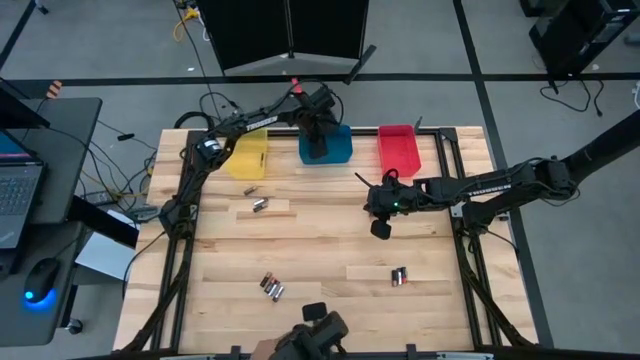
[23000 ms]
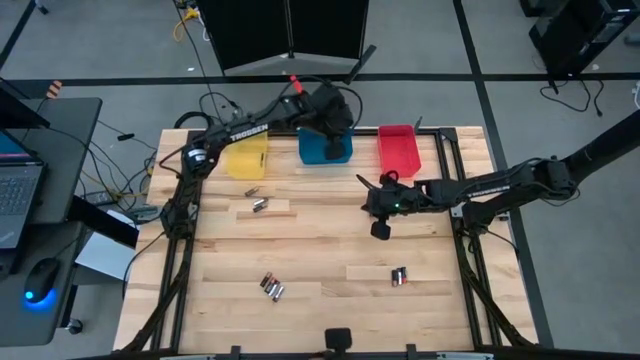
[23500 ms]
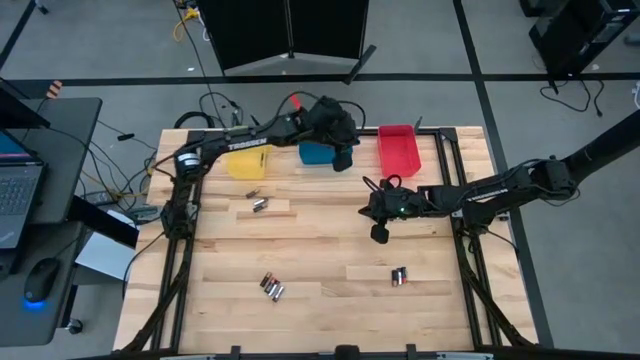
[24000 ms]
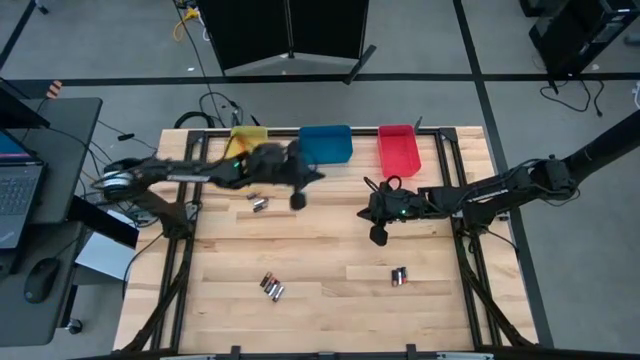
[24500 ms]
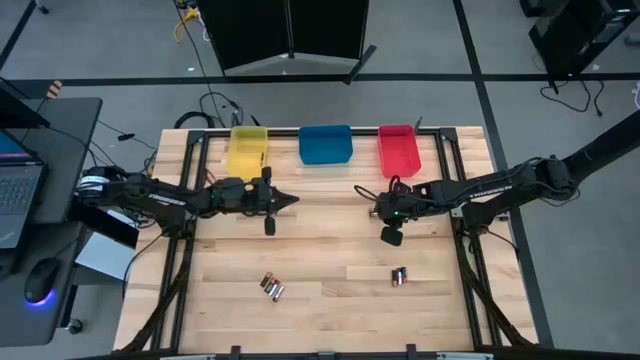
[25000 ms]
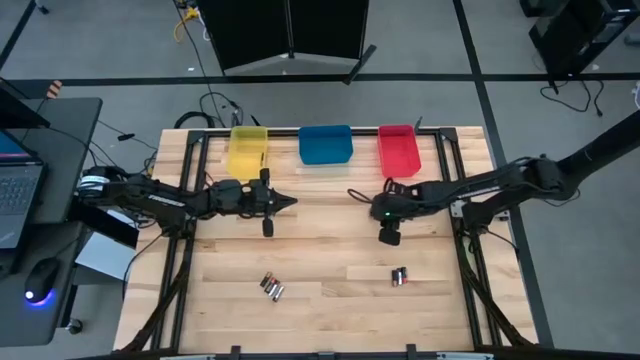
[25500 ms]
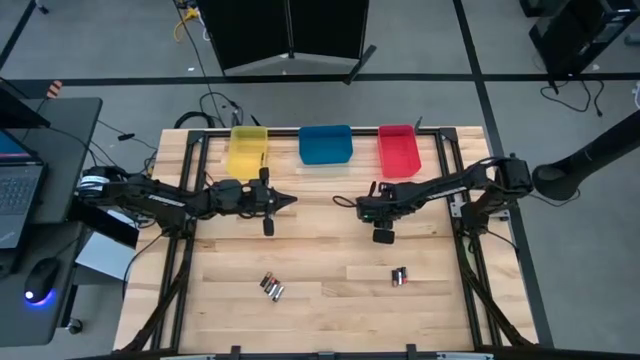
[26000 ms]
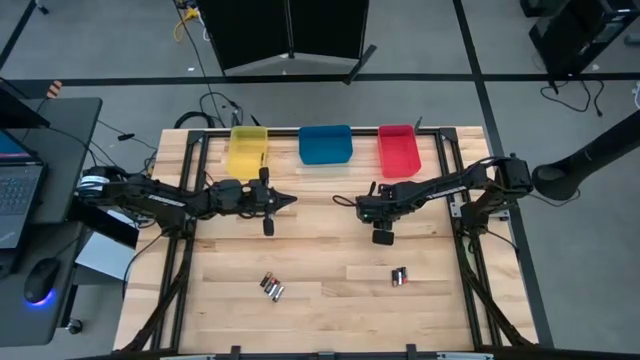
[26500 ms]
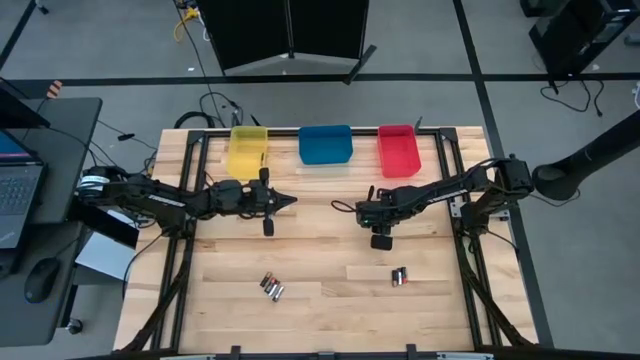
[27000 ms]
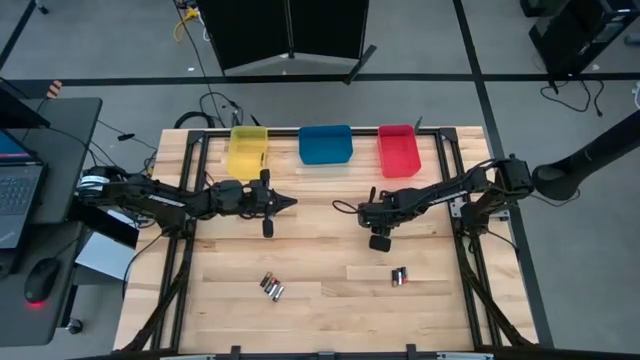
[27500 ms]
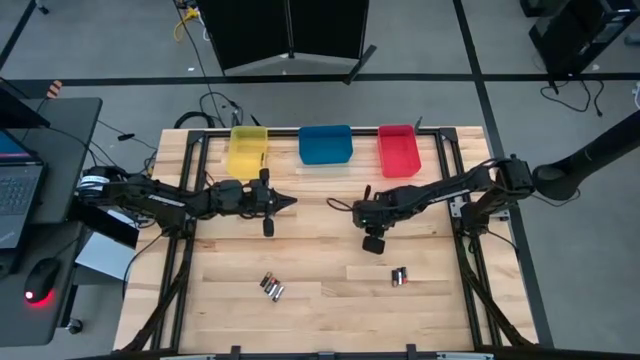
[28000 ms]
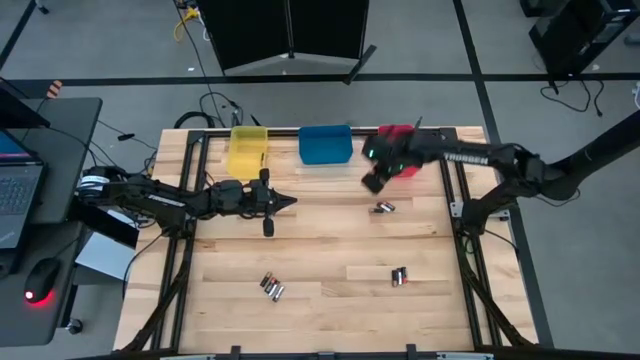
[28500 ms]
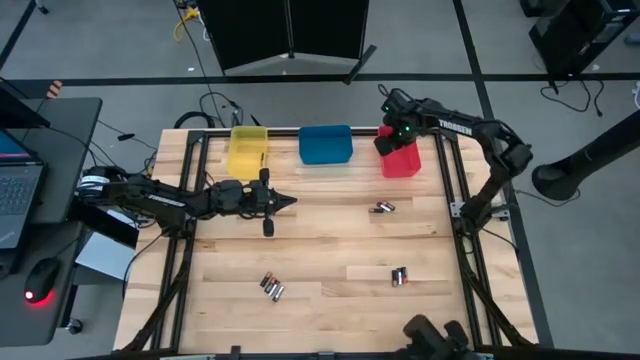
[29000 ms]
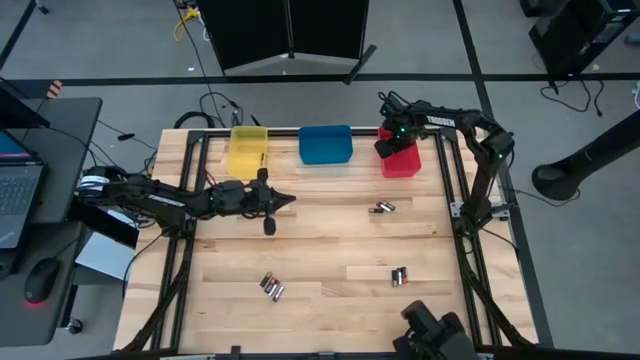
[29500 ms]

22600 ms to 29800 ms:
Task: Sort batteries
Put the silver battery into the pink bin

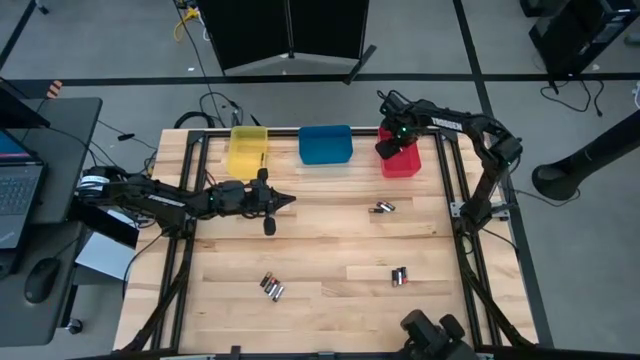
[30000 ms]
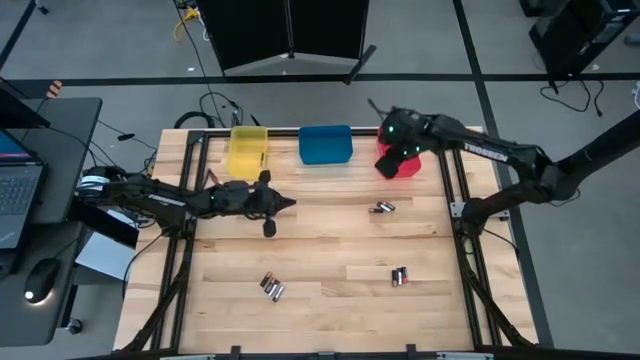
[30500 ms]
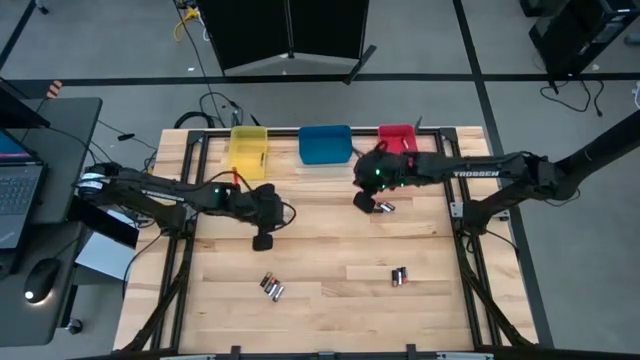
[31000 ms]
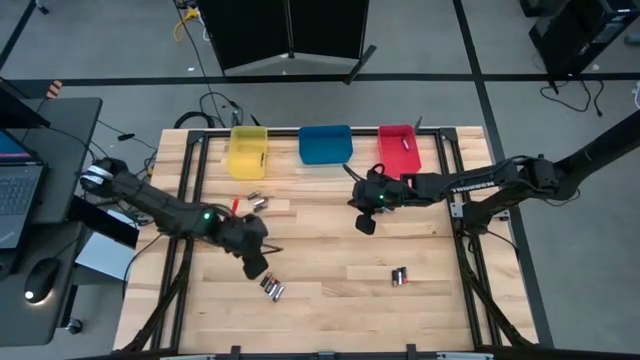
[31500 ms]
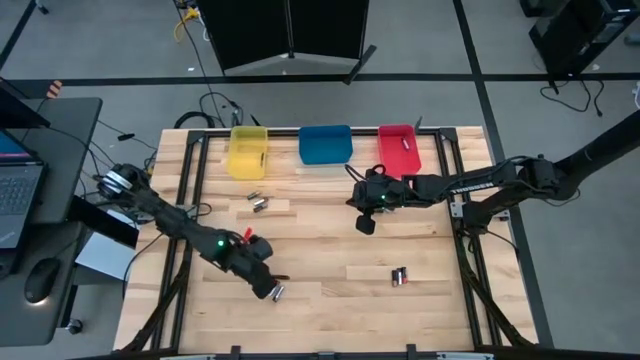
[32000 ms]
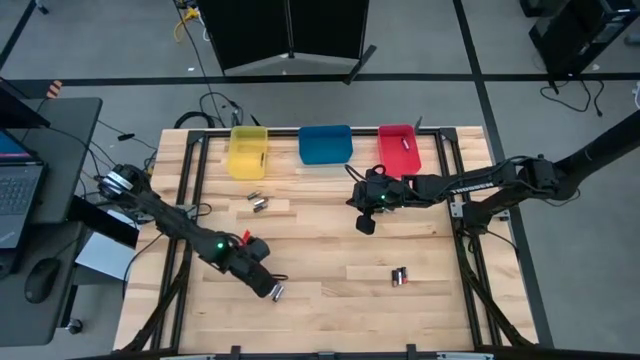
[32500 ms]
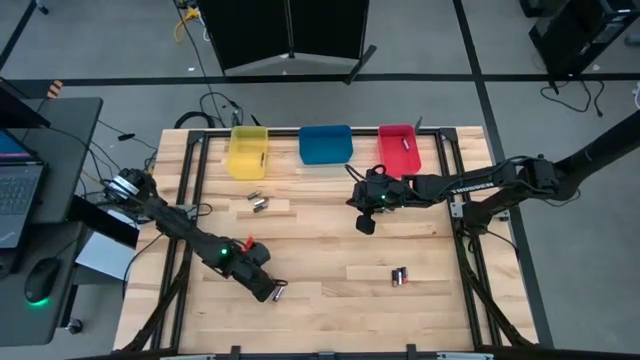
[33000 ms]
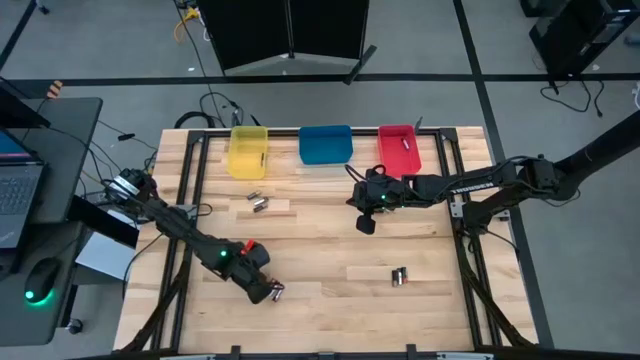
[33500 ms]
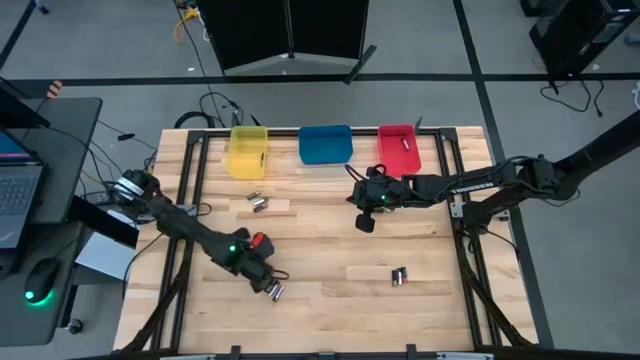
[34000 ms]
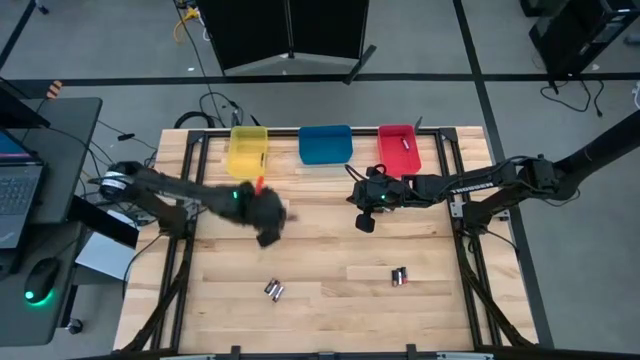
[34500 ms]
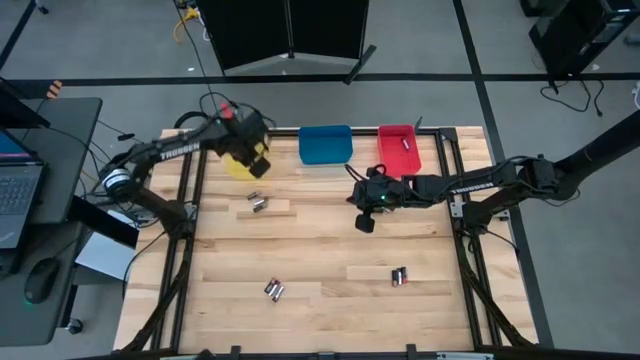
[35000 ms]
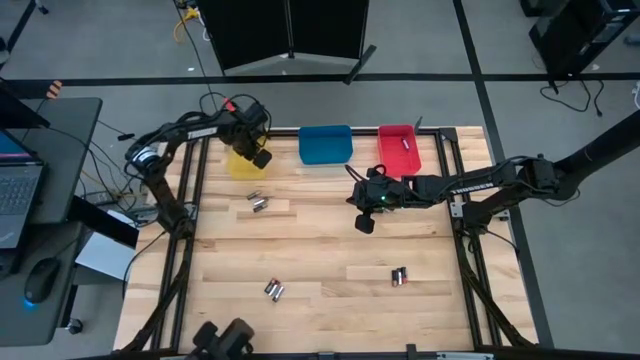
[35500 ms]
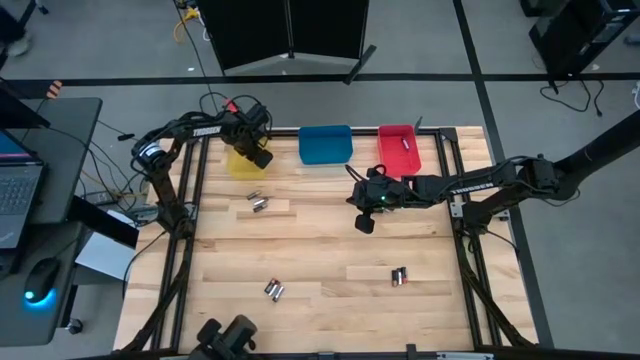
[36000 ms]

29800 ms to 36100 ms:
Put the black battery into the yellow bin

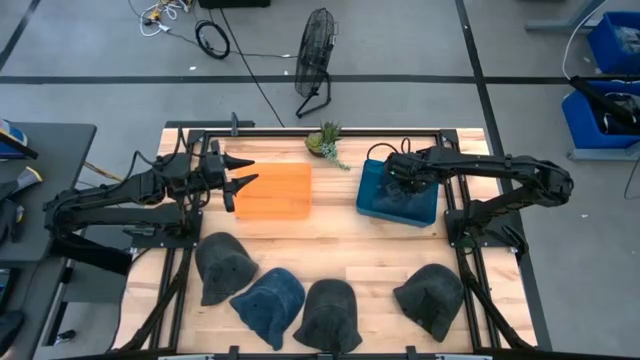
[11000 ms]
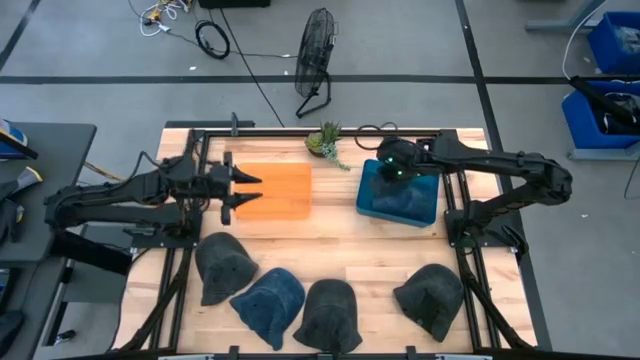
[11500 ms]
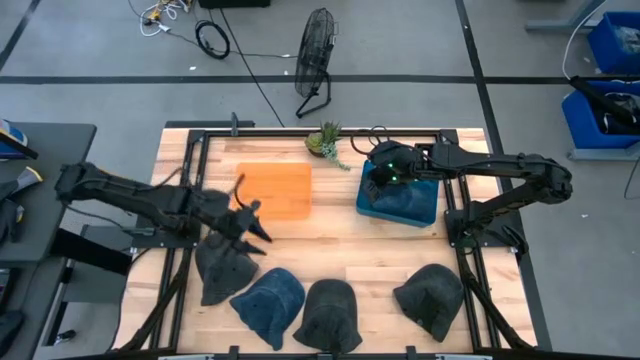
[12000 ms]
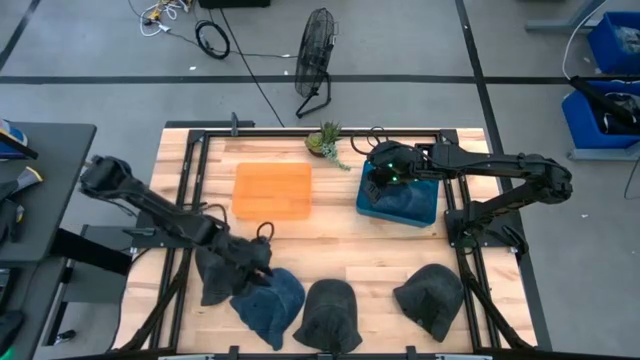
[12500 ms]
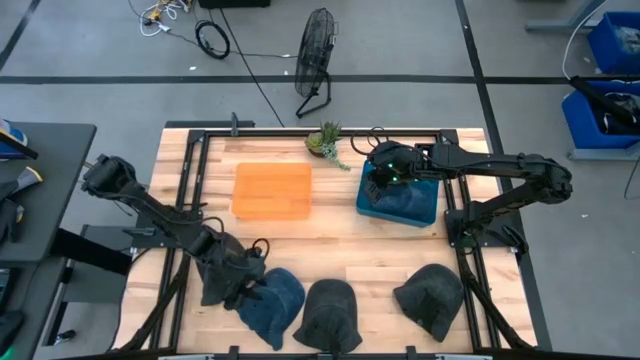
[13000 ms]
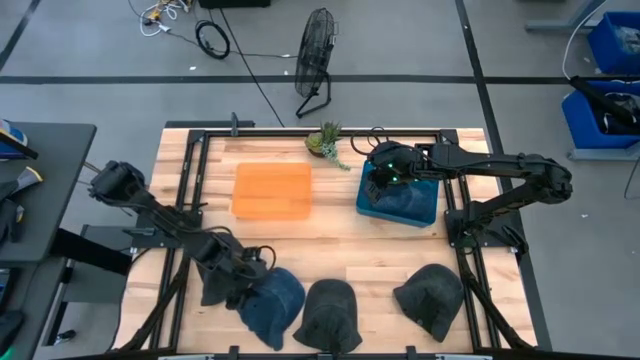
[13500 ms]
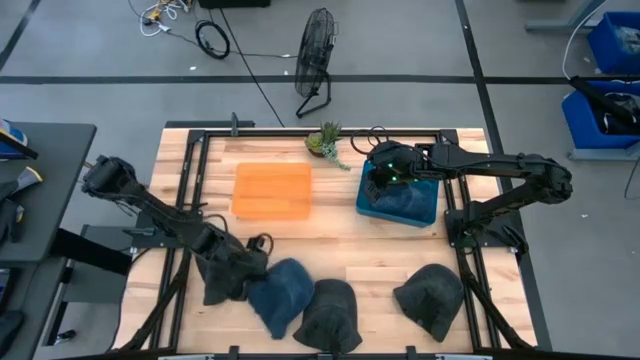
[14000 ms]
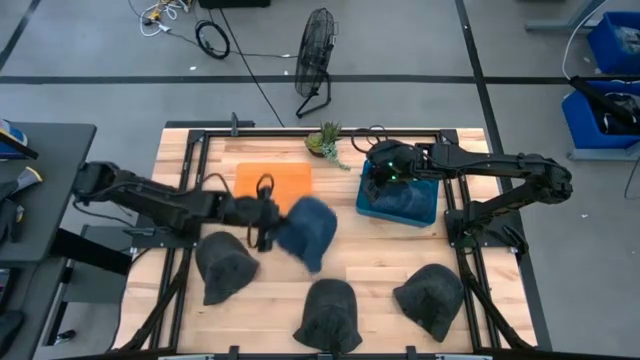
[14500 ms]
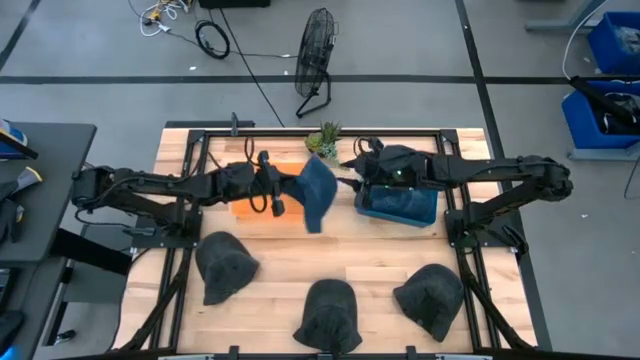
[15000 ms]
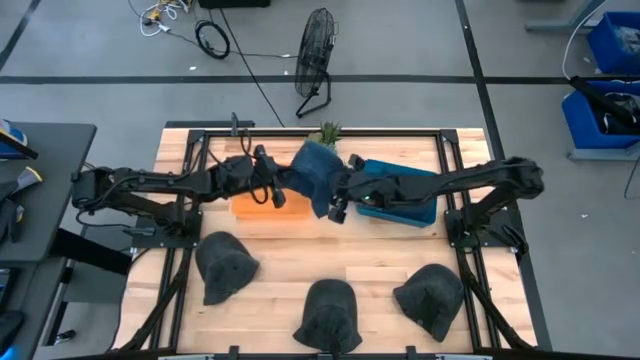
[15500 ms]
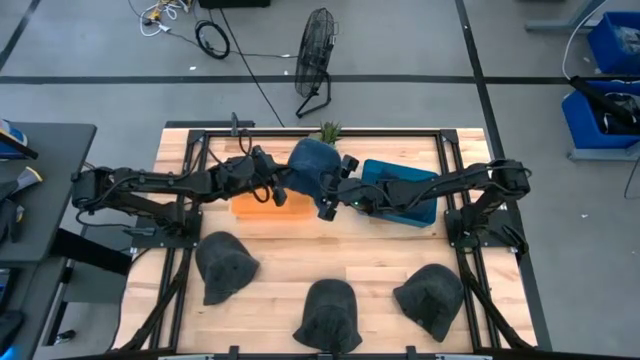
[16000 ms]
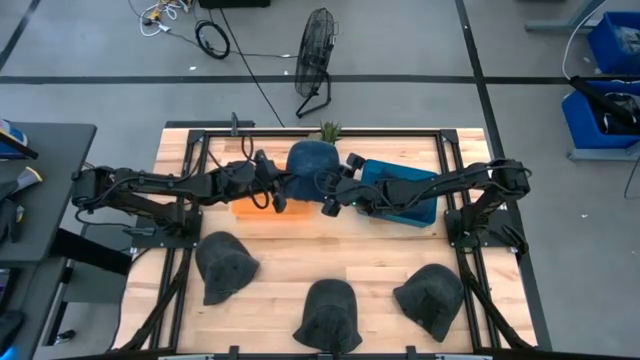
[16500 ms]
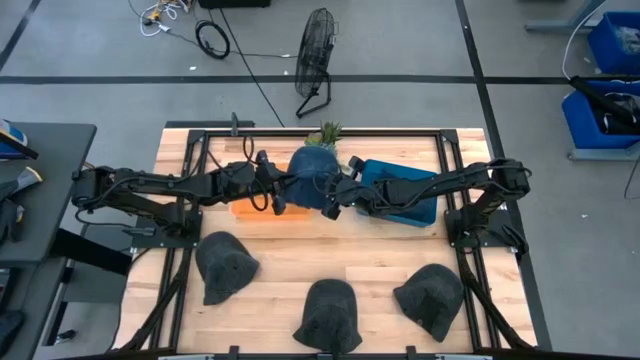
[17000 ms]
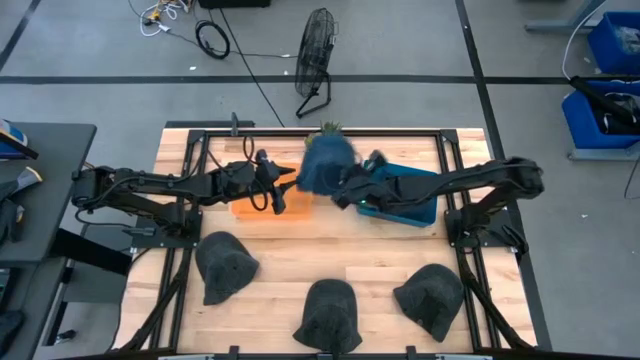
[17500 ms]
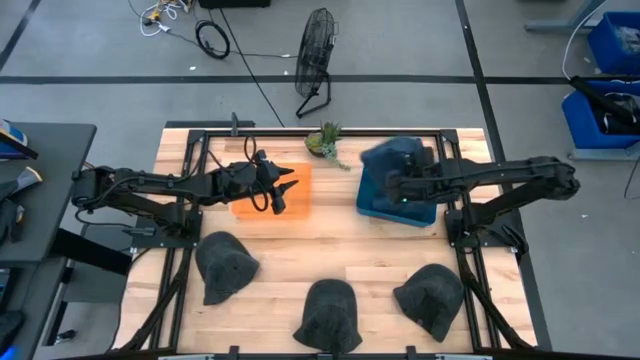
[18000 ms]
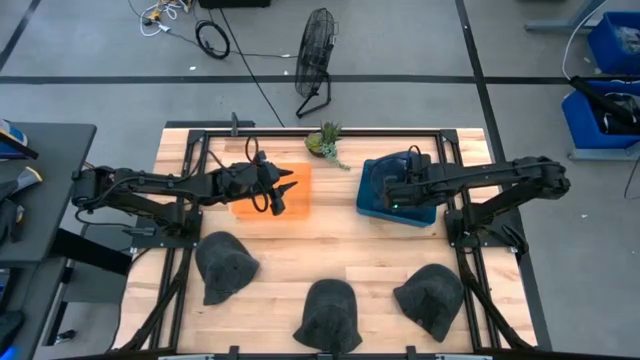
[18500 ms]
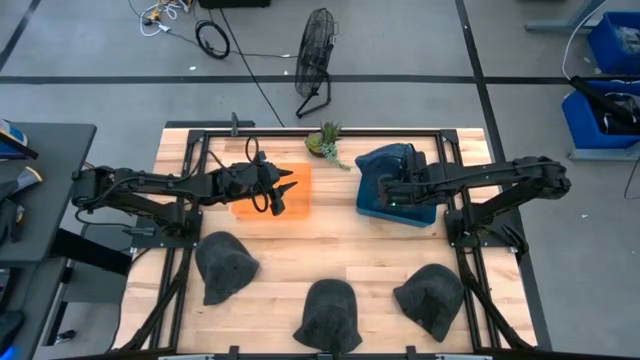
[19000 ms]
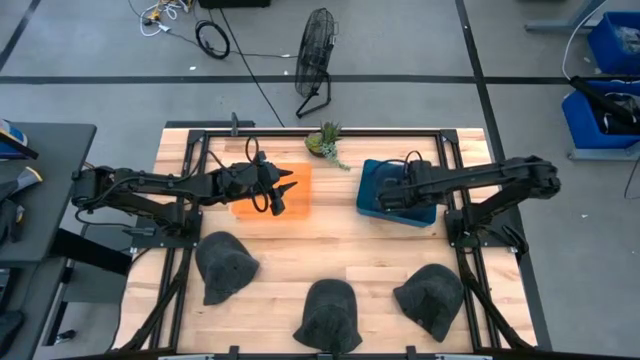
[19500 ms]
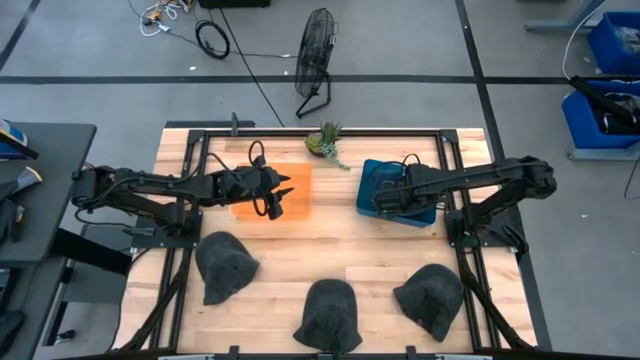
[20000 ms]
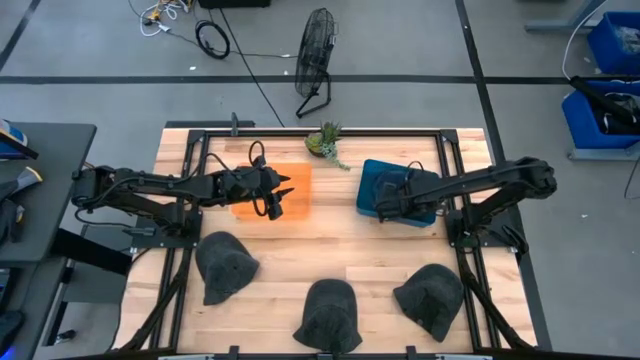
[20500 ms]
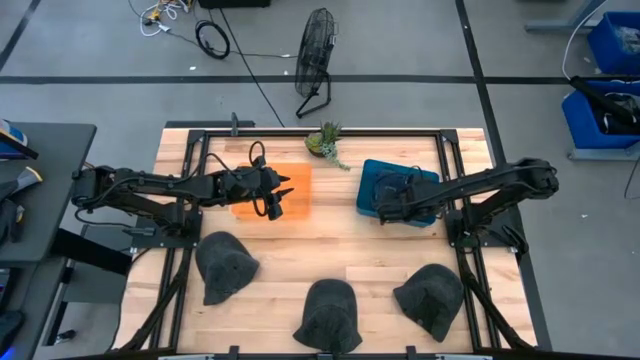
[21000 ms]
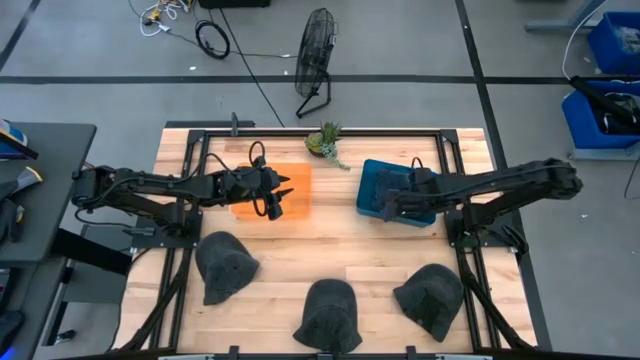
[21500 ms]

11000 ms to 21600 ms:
Task: Pick & Place hat
Put the blue cap into the blue bin
